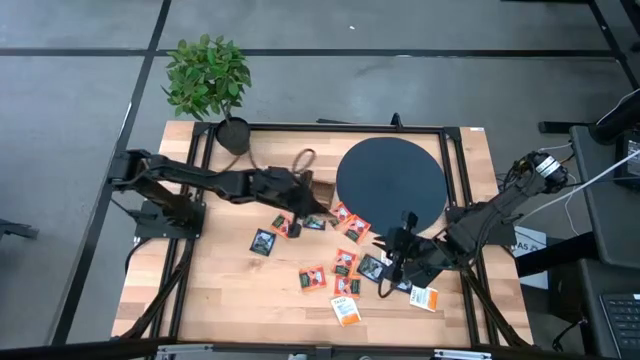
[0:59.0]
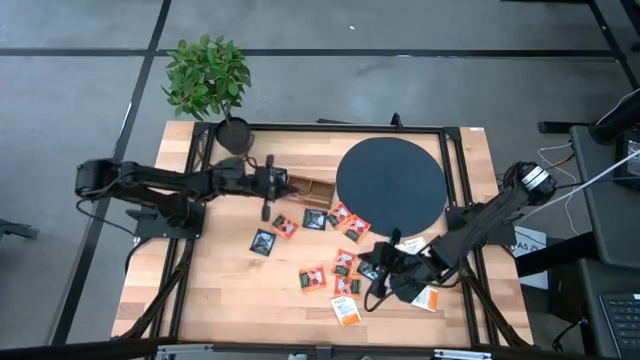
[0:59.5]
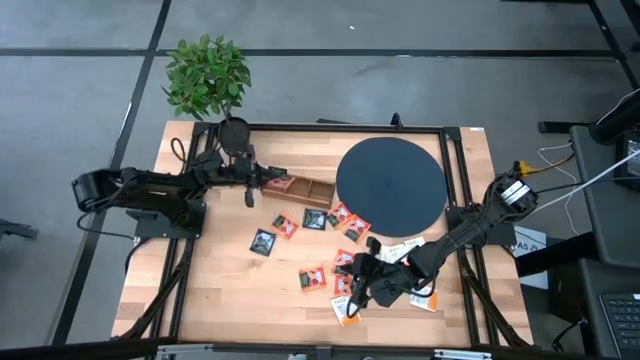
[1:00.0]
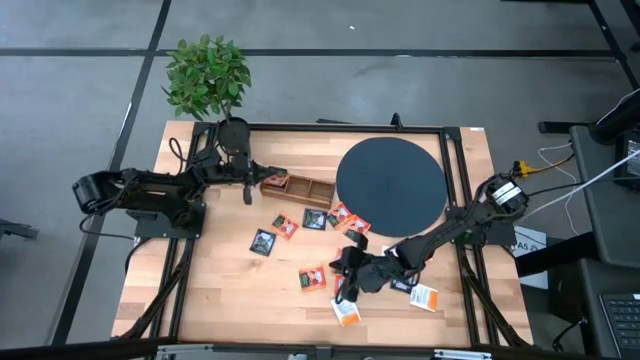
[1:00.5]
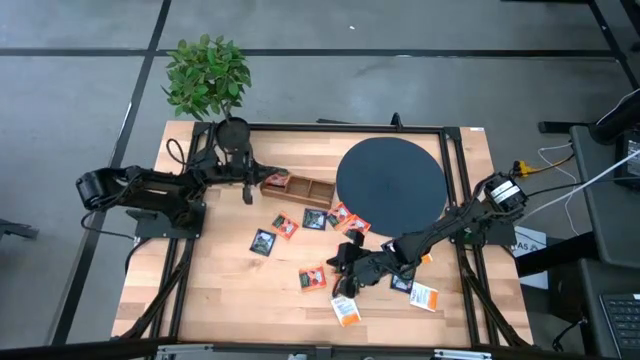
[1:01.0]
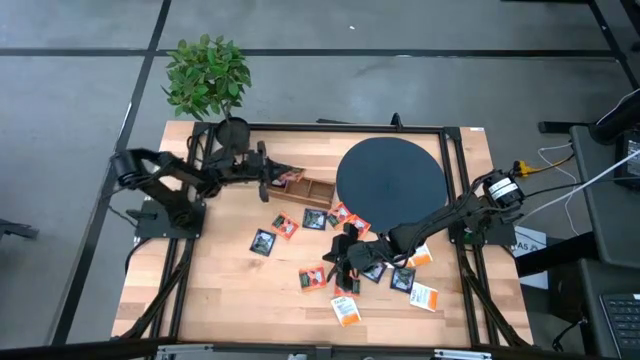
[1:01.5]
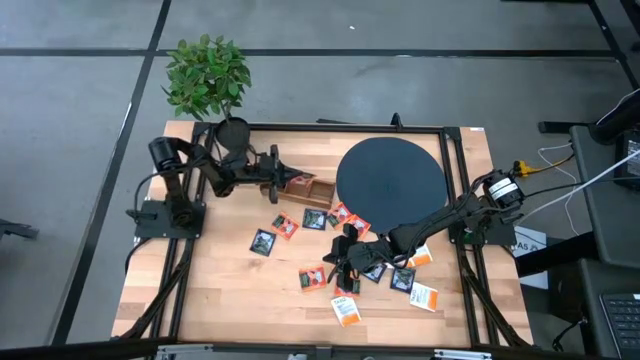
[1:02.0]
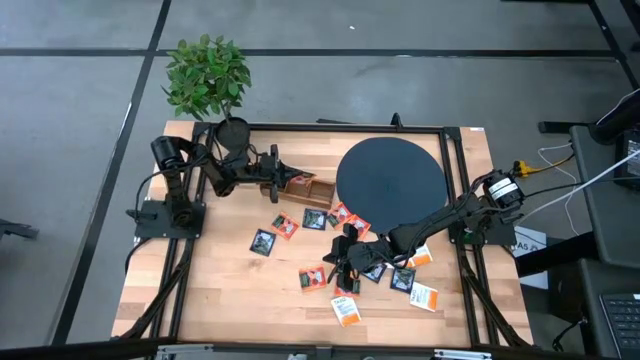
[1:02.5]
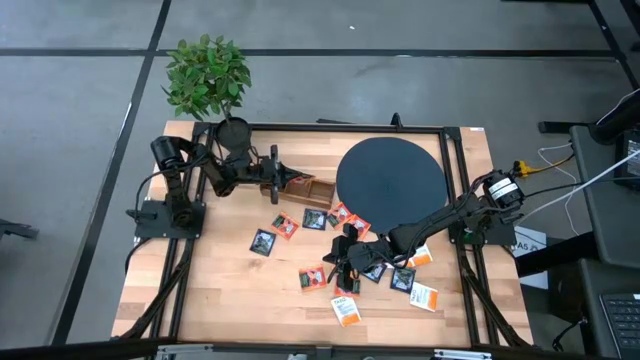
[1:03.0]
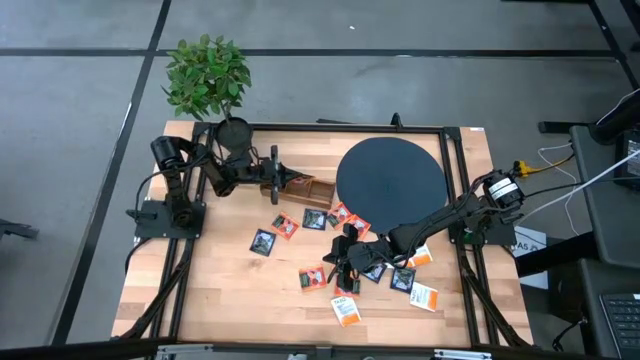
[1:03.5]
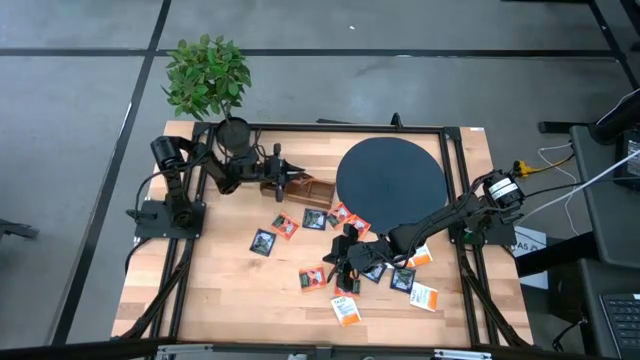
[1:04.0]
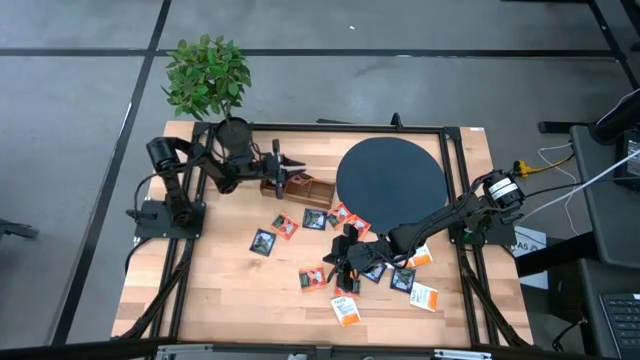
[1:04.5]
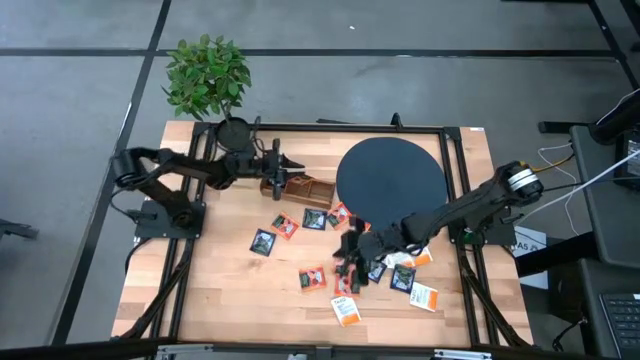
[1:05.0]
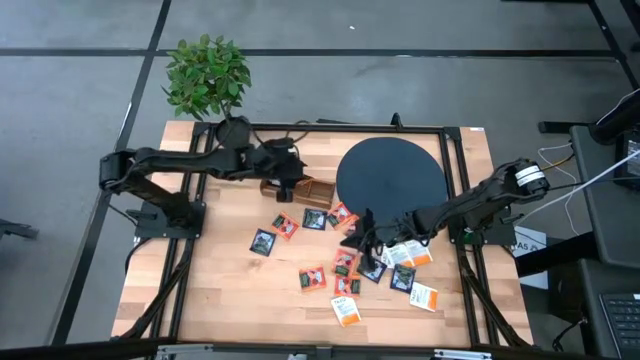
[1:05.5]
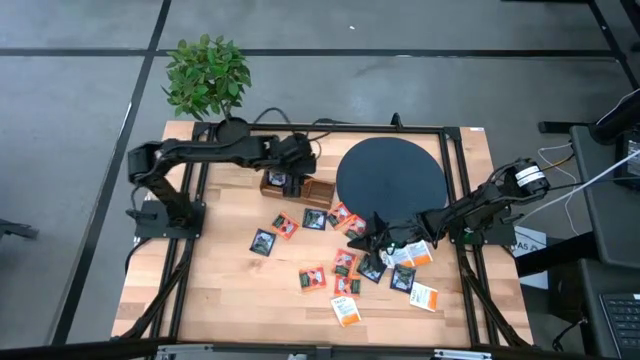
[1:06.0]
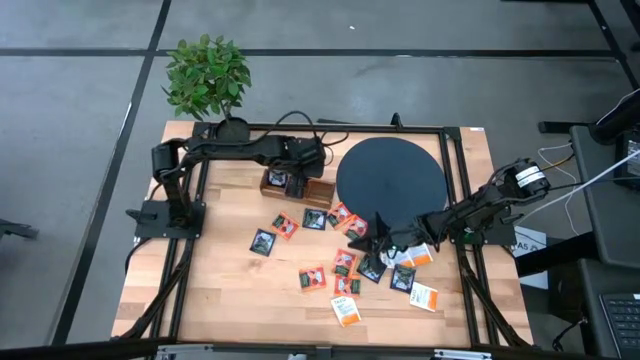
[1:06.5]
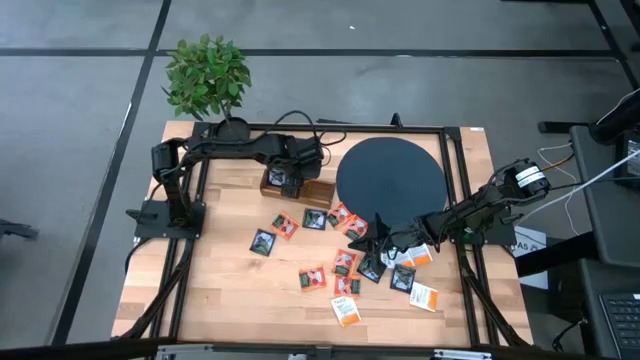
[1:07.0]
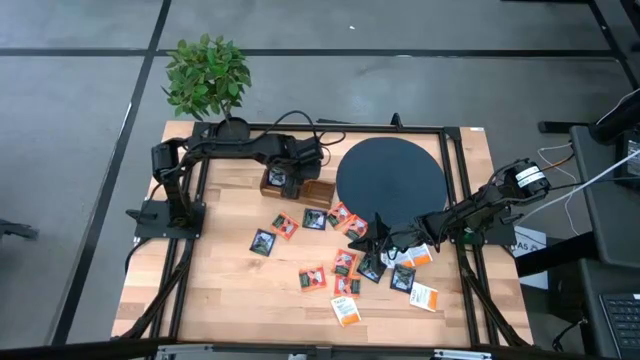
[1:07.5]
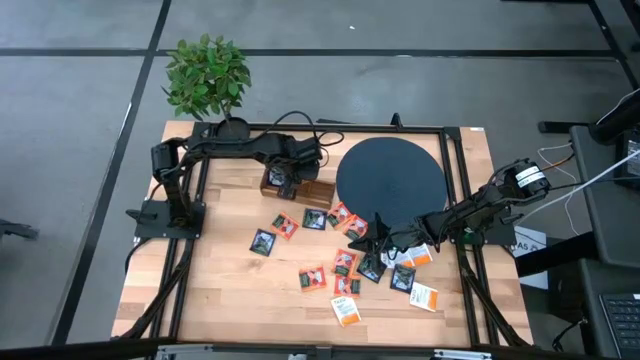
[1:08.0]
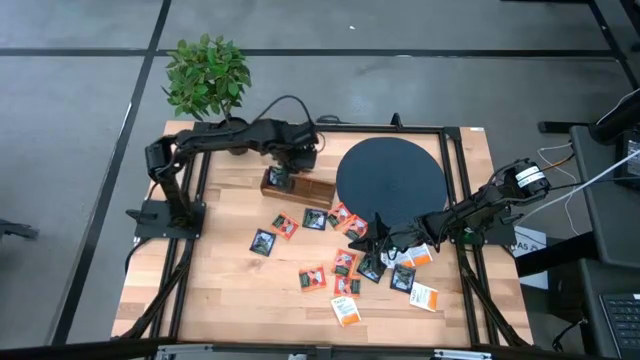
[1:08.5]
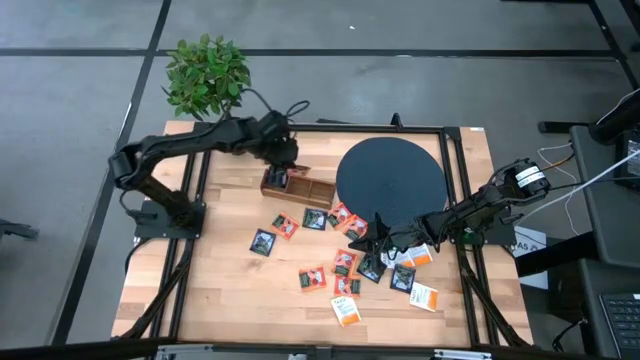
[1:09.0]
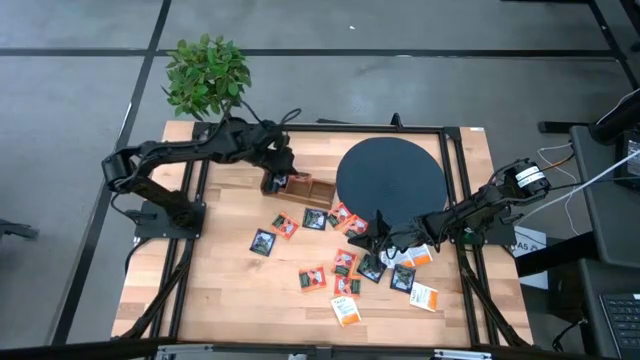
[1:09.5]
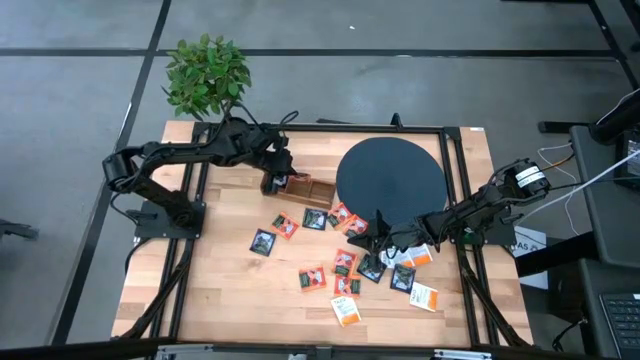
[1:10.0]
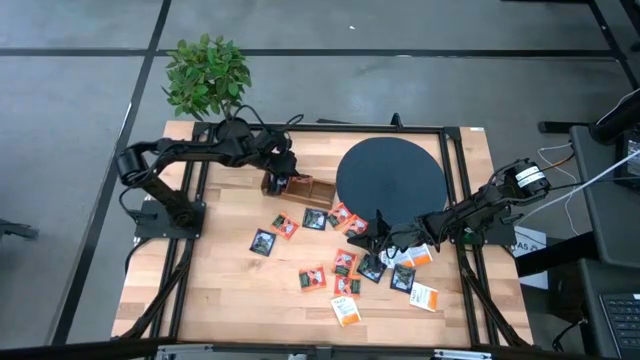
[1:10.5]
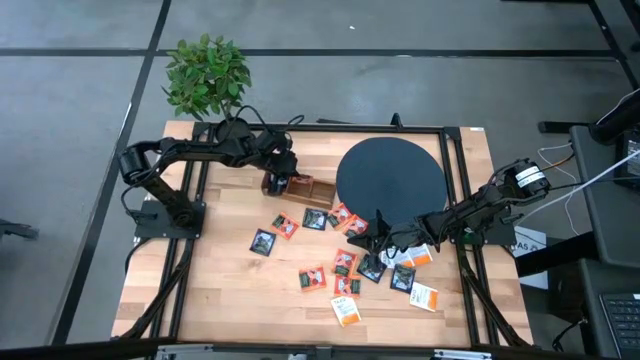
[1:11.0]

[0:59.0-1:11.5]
Task: Pick & Place Tea
Put the orange tea bag into the middle section of the wooden organizer

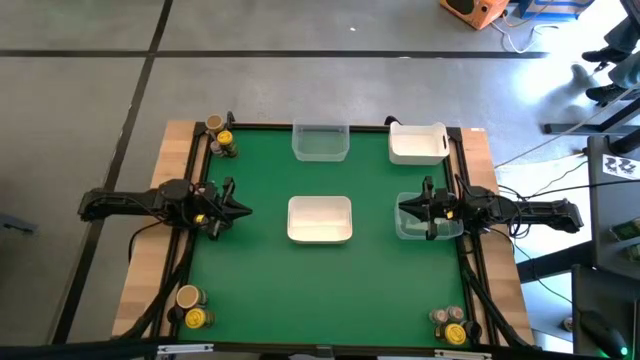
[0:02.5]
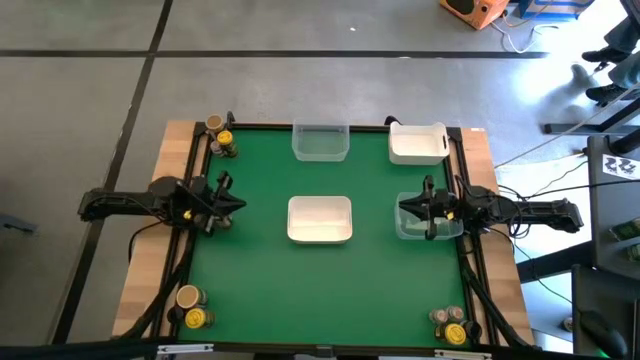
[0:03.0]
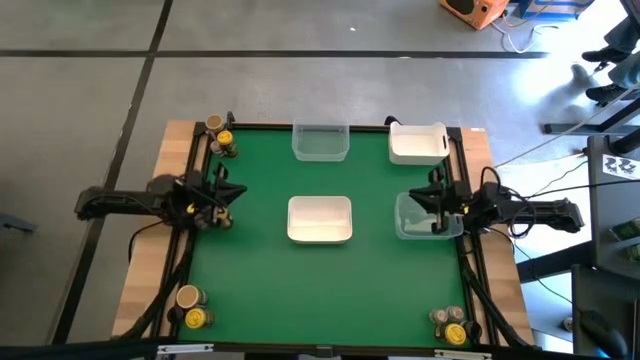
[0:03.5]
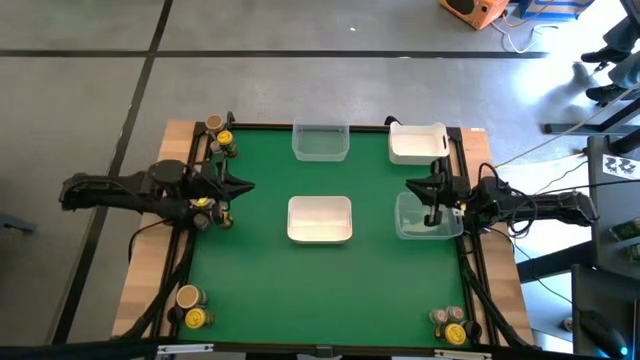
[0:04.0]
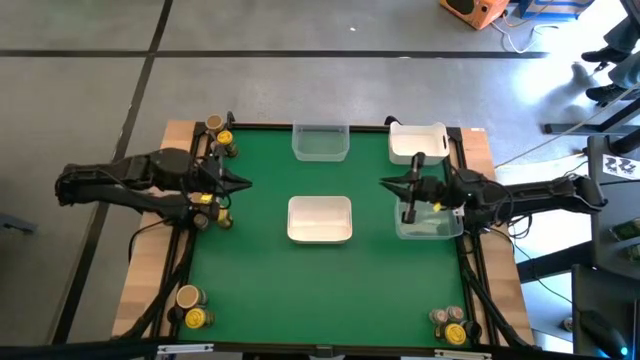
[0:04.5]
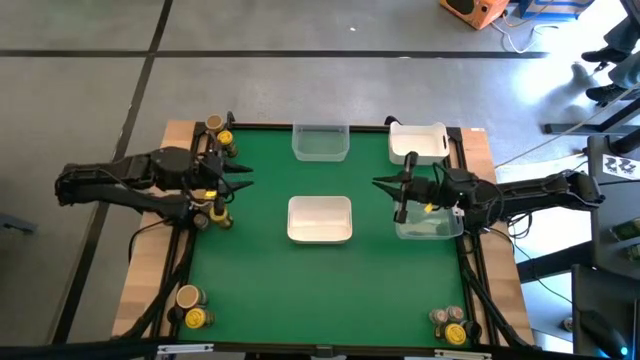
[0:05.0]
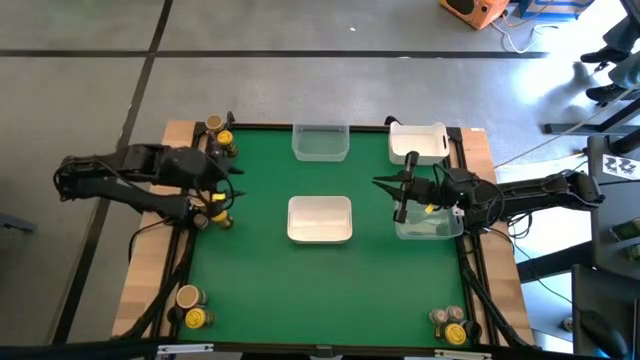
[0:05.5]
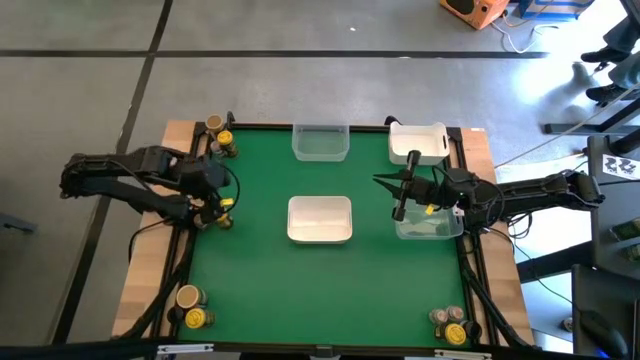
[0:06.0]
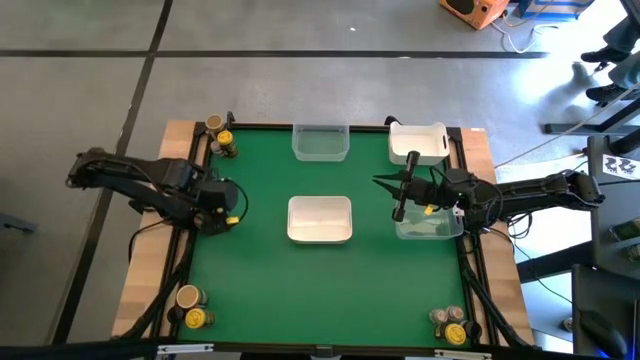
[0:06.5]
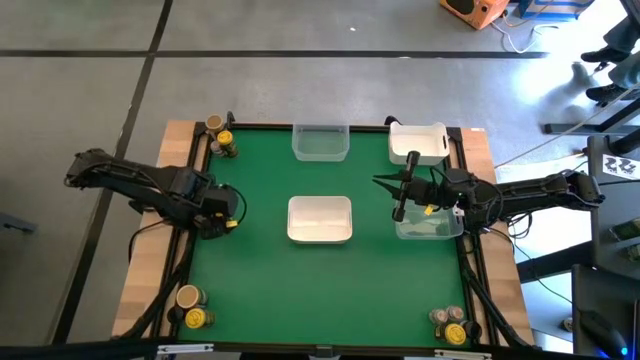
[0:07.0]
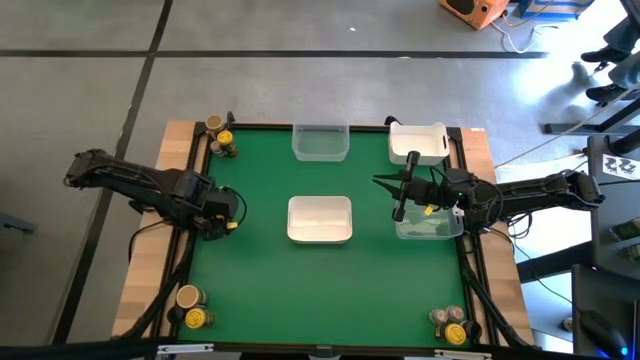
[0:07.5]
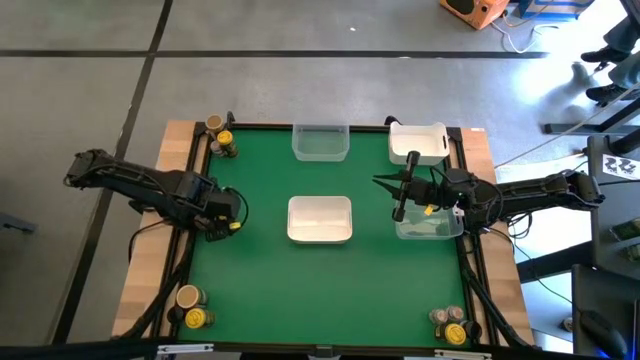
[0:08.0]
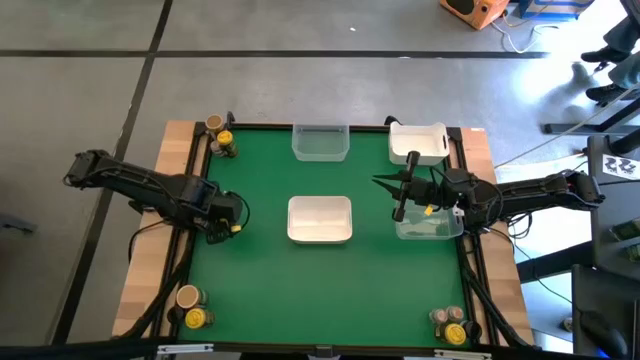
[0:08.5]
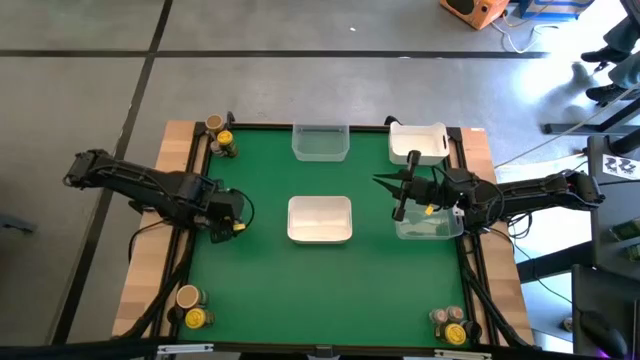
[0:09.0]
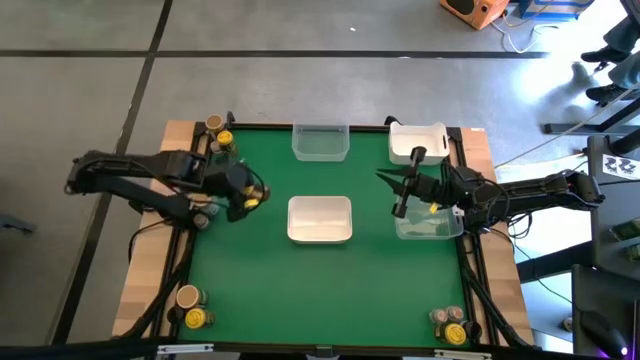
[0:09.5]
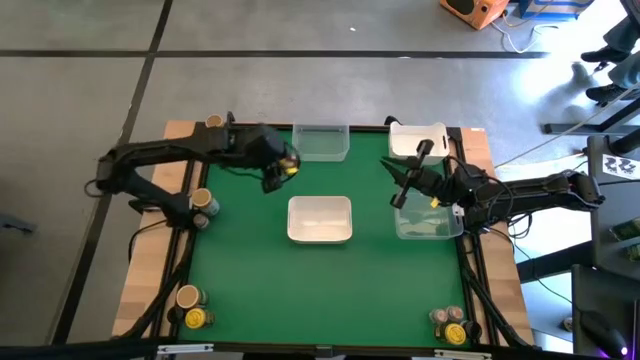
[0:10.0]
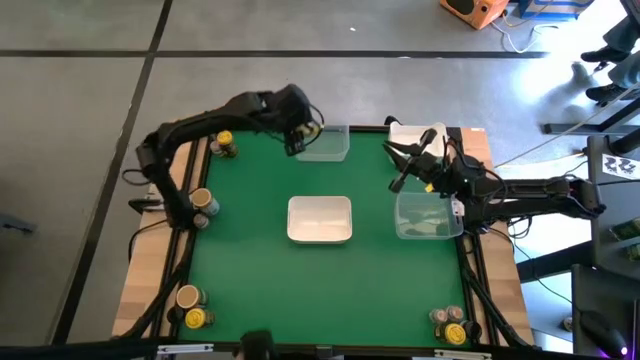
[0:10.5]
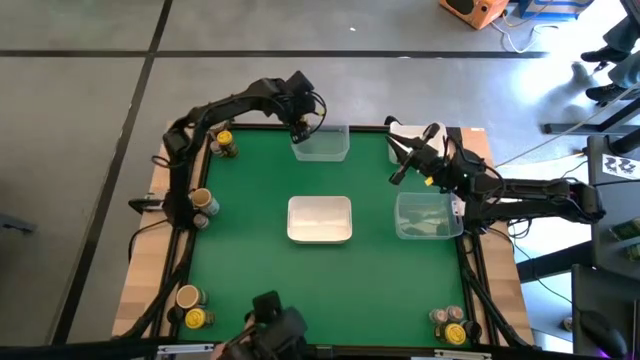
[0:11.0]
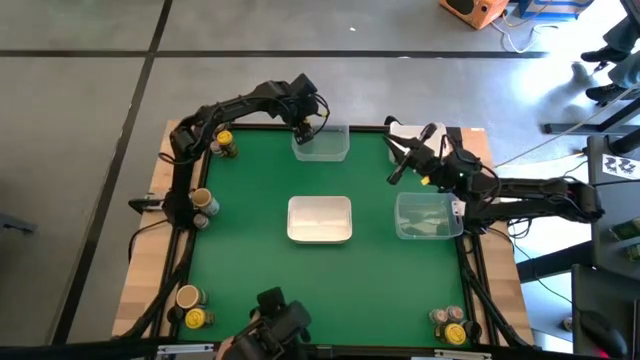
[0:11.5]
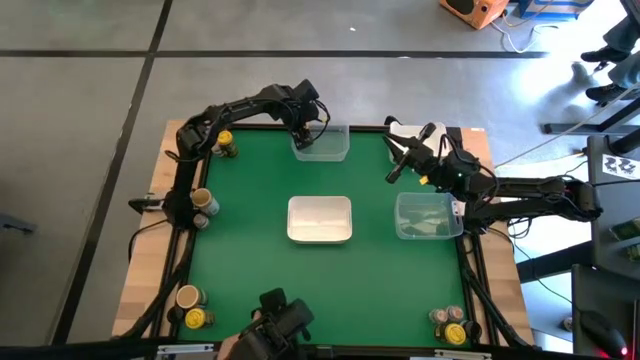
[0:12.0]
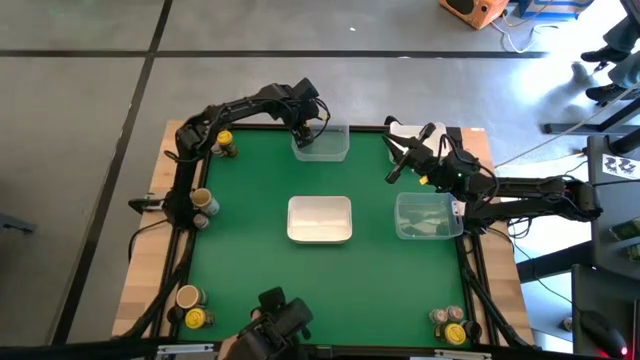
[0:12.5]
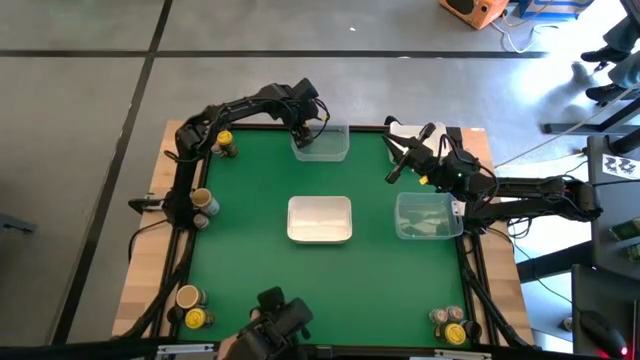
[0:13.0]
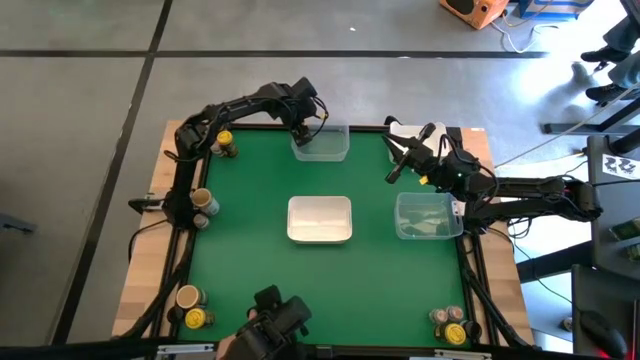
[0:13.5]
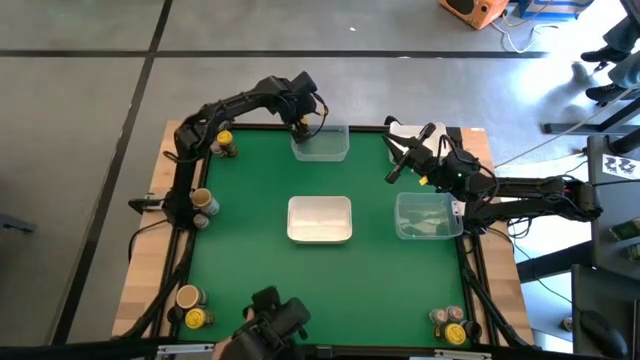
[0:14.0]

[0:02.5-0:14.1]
Task: Sort spices by type
Put the middle yellow seasoning bottle into the top transparent bin
